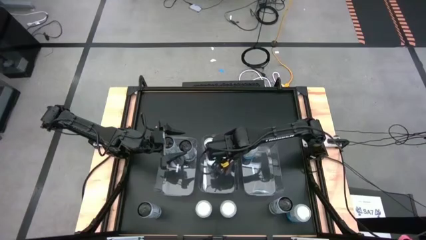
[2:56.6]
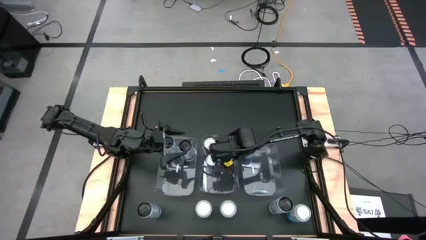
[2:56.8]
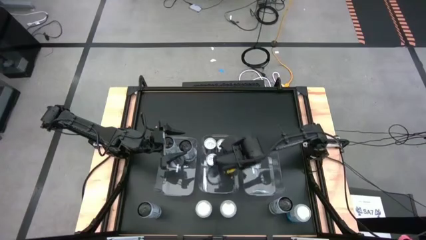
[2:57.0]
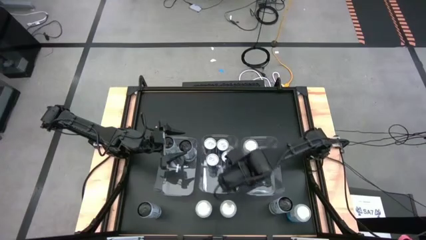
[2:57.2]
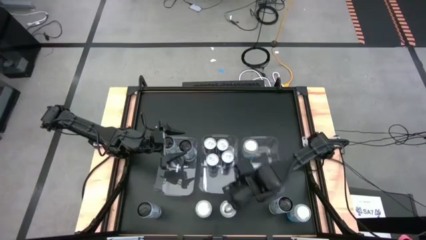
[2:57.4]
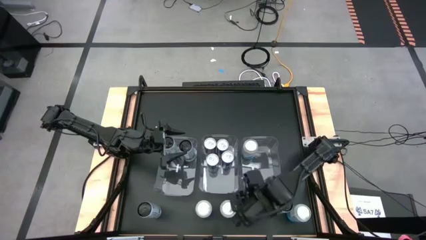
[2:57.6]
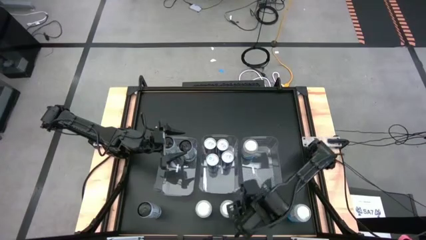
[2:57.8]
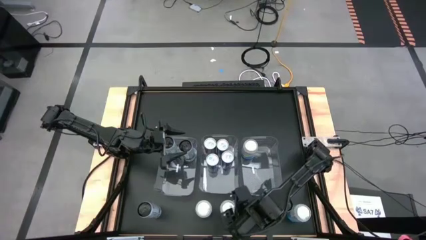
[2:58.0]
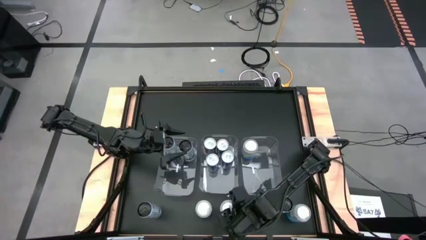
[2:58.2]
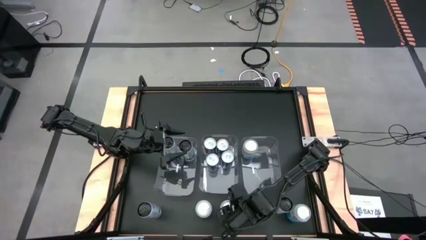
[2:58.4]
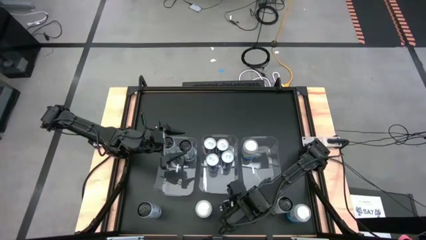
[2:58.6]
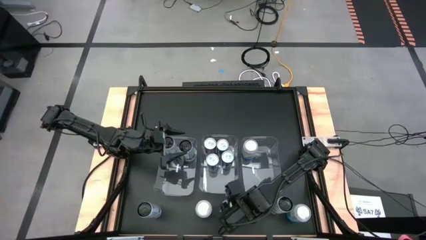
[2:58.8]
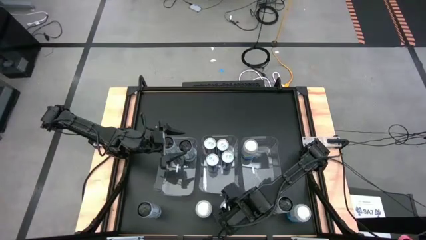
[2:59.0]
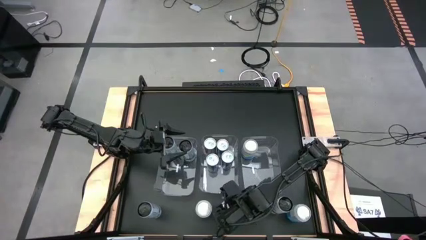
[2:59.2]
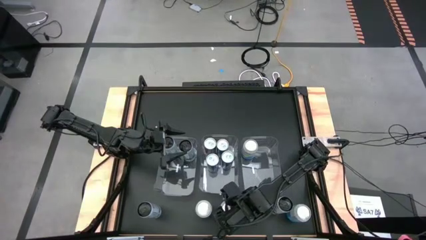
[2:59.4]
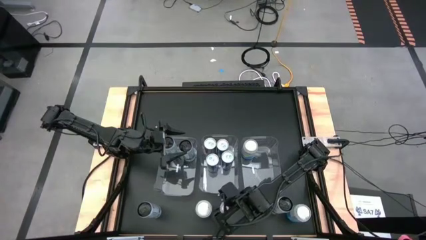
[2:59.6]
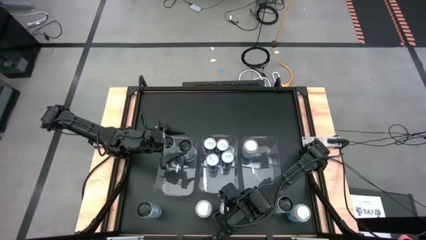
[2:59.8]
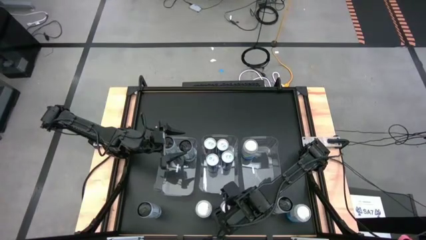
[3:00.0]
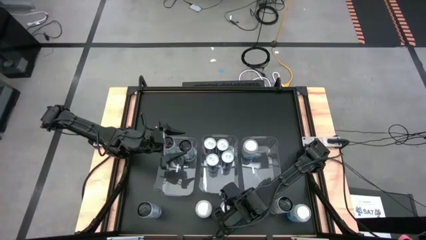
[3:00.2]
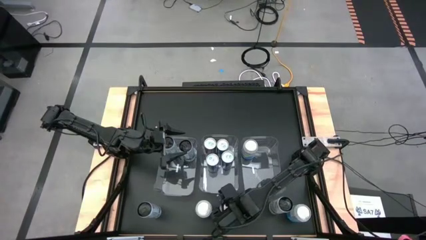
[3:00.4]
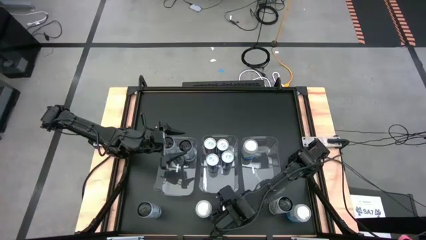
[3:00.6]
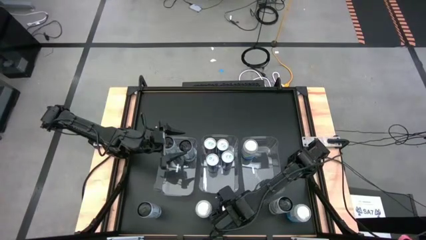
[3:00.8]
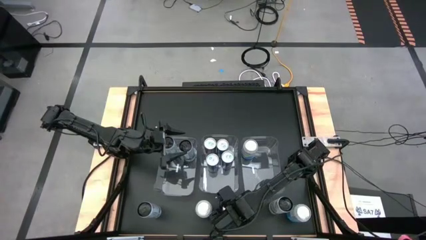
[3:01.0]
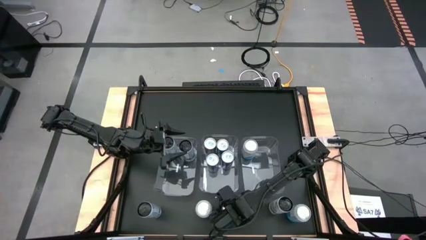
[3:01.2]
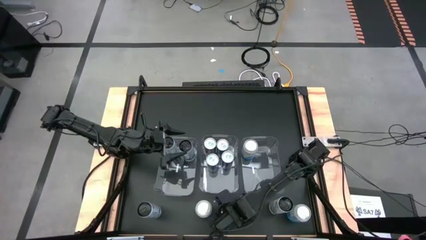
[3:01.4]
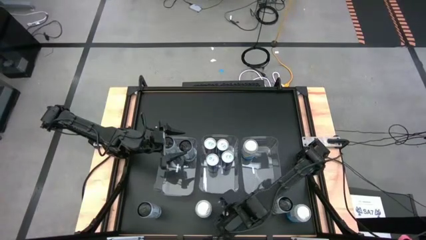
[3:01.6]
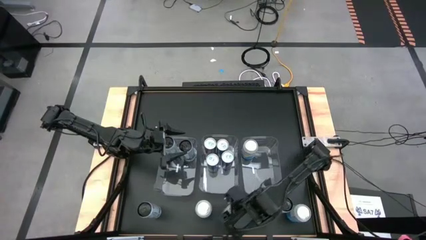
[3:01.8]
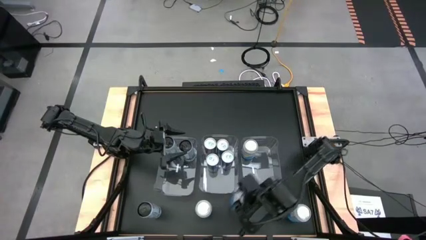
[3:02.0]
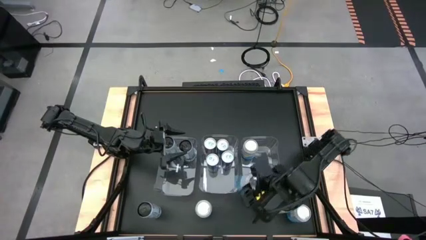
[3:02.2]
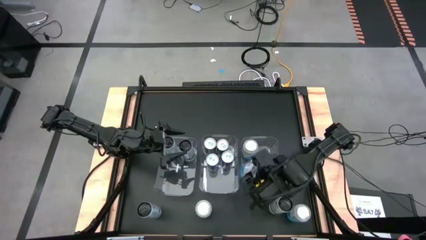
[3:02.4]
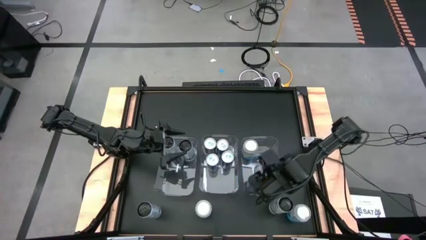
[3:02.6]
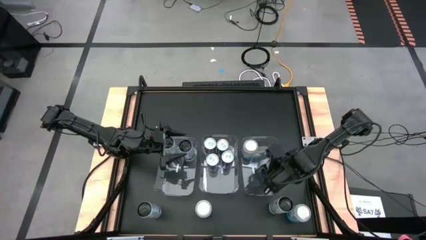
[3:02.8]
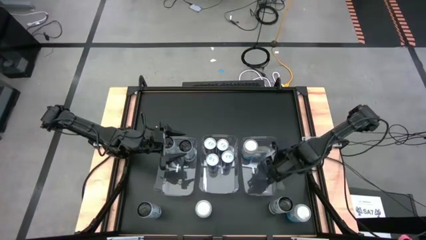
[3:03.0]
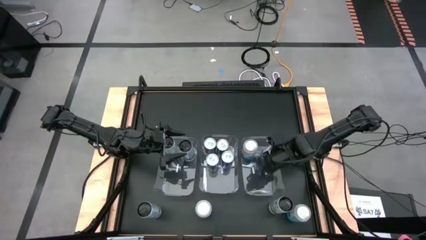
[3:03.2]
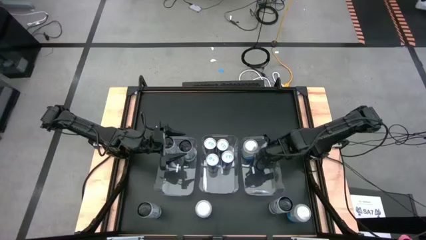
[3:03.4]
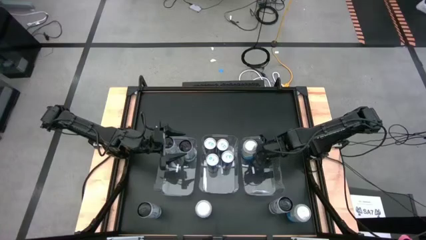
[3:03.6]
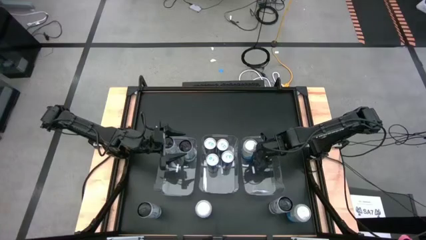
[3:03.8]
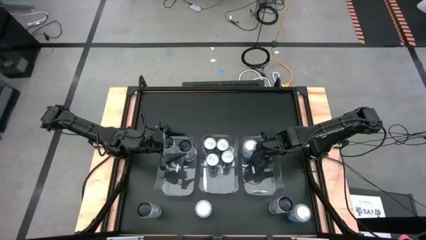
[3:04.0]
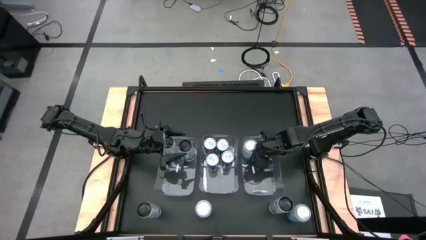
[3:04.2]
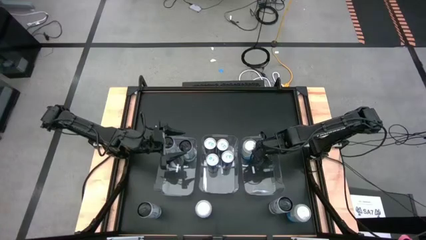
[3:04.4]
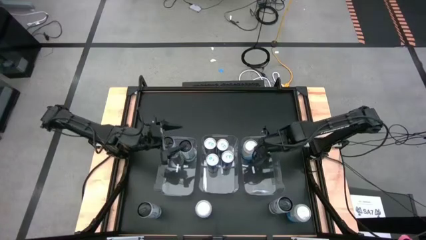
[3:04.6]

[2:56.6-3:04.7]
Task: Sort soda cans
Put the middle white and blue soda can into the right transparent bin

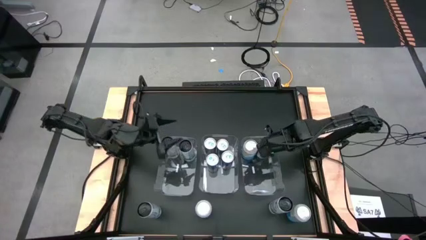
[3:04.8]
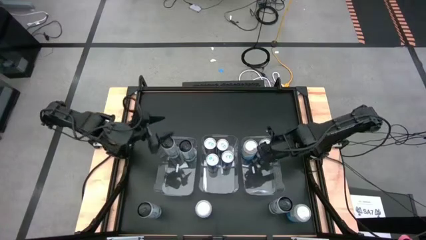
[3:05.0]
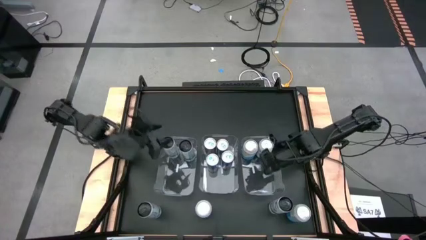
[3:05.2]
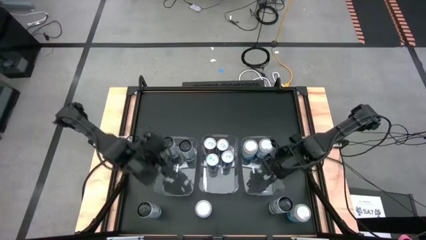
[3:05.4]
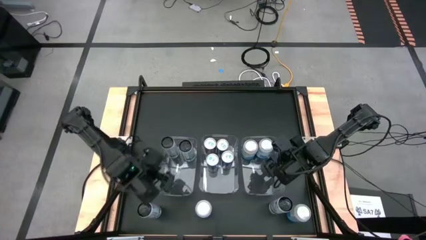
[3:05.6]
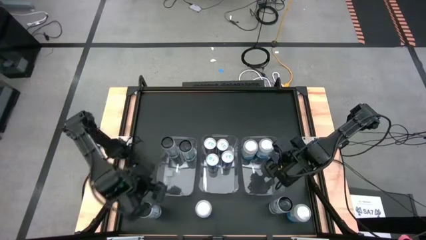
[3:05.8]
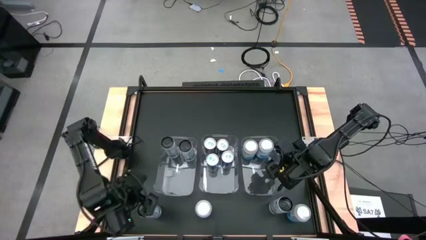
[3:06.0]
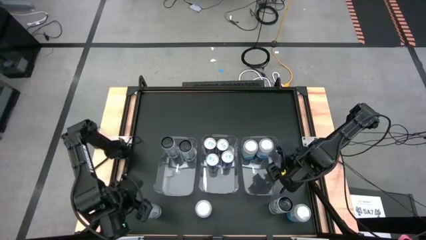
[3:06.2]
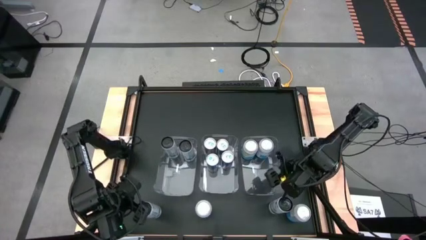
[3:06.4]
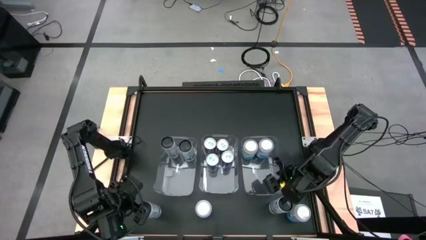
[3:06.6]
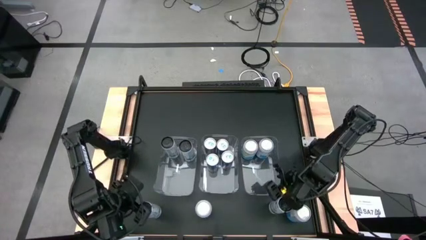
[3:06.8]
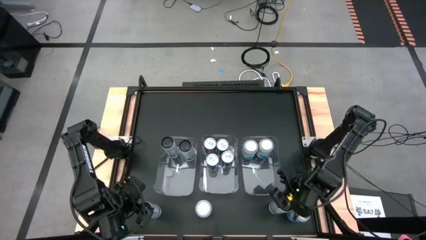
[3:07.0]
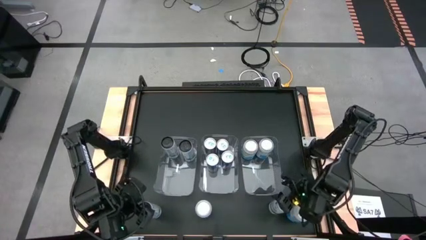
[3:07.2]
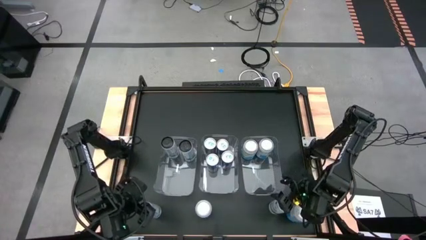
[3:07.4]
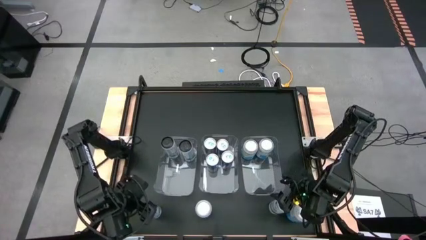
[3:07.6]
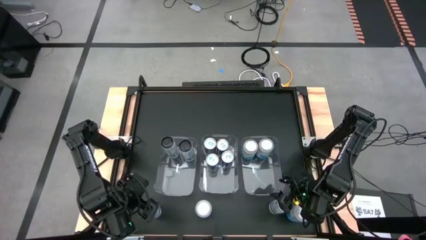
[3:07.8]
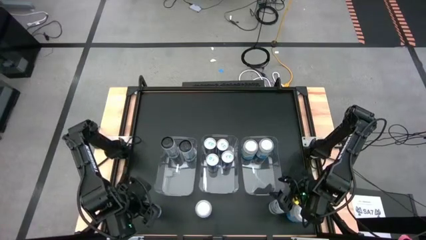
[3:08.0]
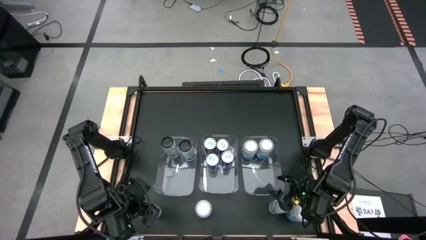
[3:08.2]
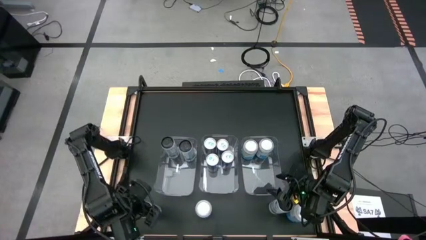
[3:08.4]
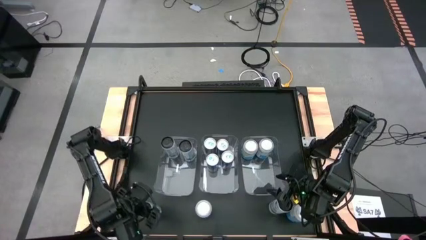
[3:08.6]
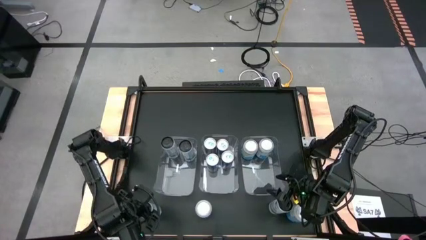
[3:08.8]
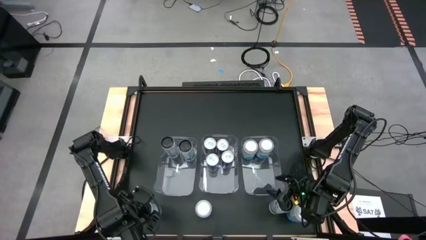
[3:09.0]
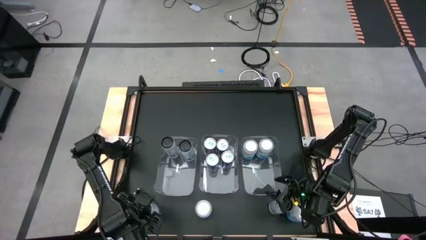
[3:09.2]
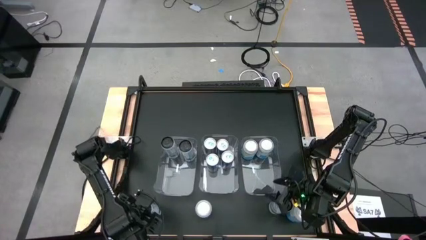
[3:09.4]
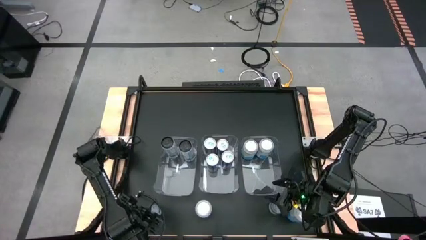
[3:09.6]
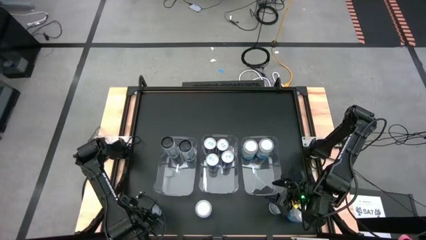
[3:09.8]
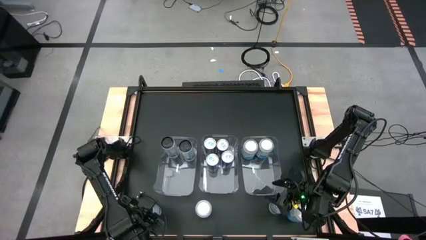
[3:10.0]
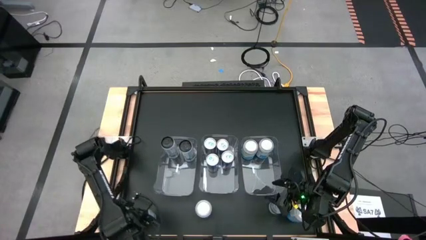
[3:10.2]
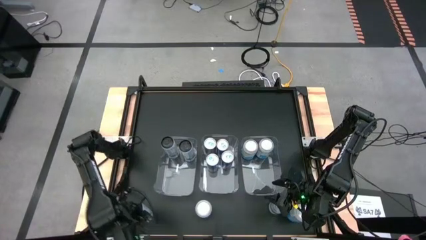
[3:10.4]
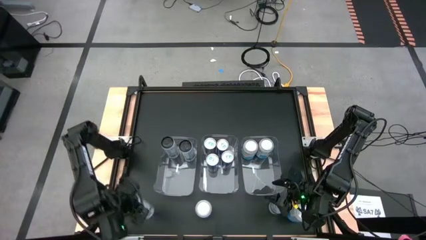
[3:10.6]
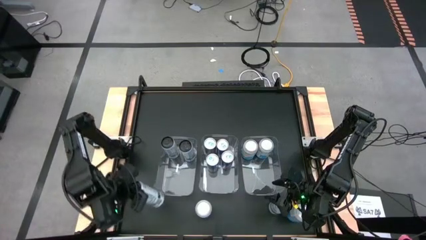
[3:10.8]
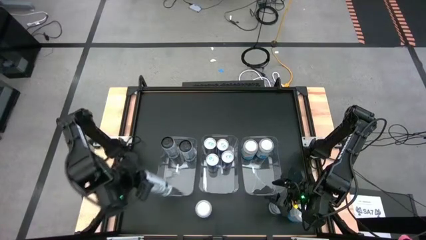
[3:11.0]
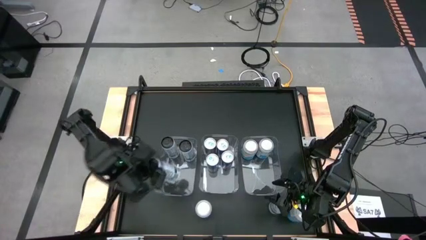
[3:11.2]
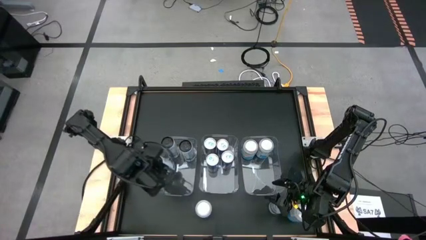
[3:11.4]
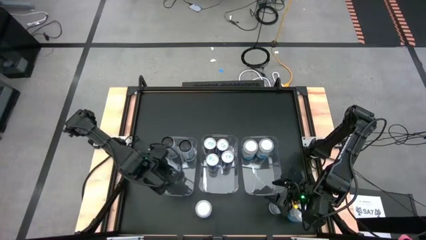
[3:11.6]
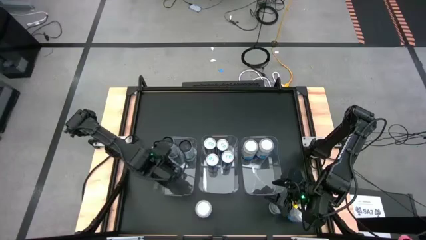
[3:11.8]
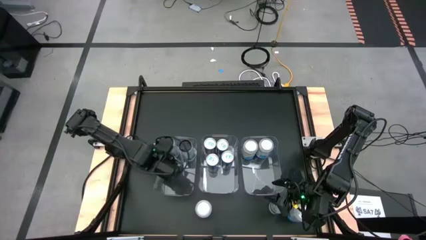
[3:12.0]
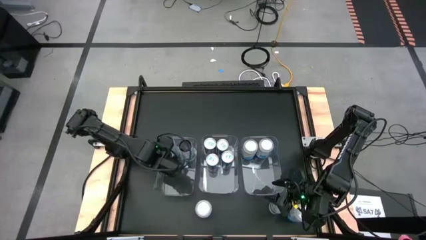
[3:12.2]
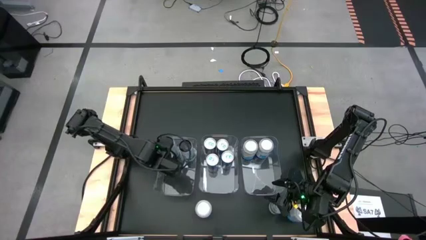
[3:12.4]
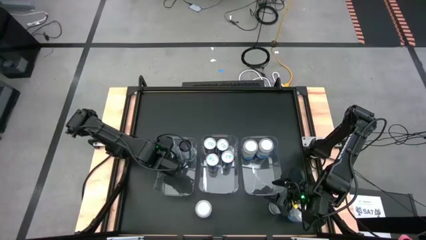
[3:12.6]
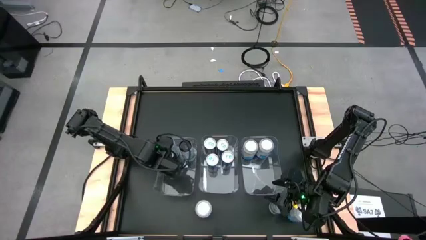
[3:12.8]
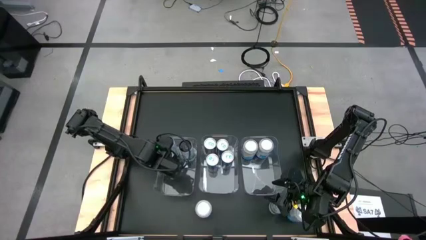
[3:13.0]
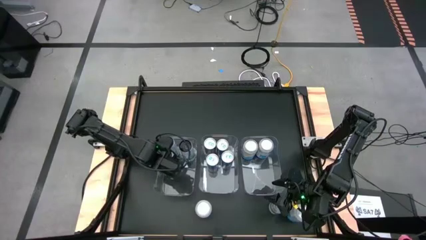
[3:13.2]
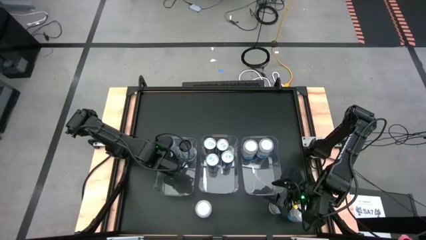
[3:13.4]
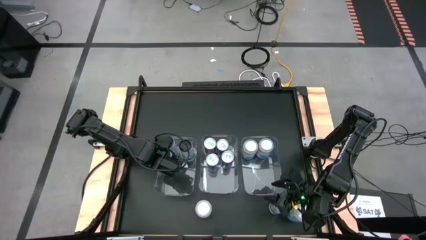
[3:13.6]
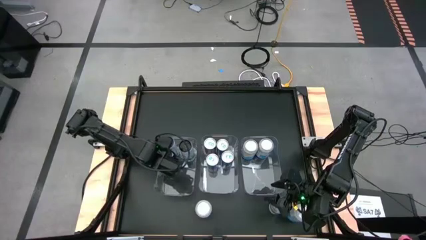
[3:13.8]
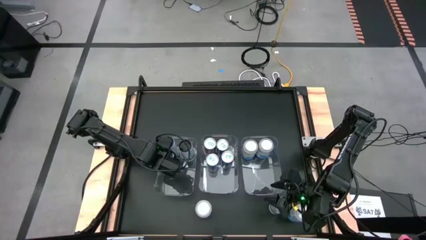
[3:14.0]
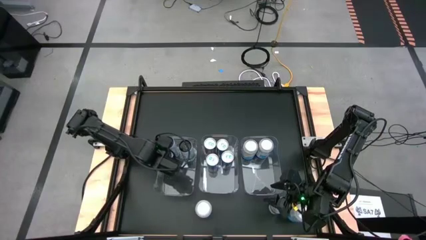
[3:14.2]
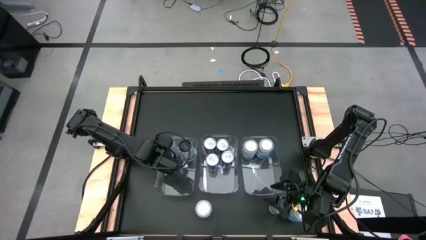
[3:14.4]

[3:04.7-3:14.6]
Put the left white soda can into the left transparent bin
